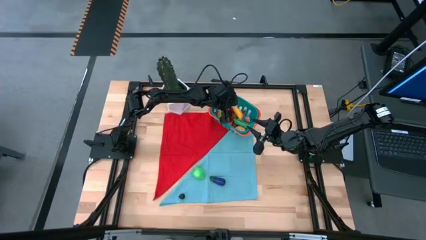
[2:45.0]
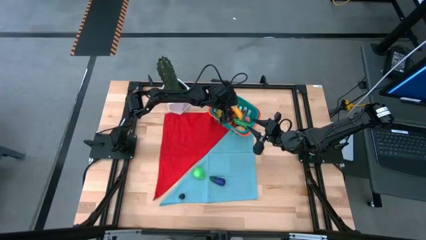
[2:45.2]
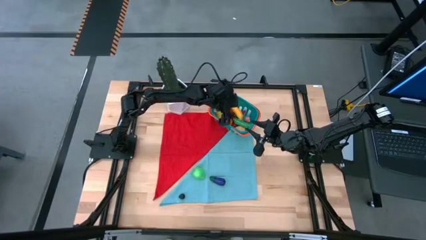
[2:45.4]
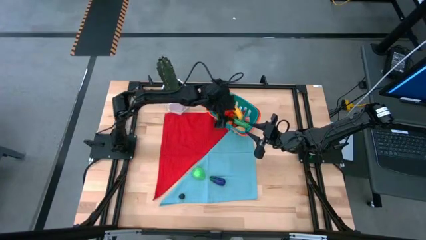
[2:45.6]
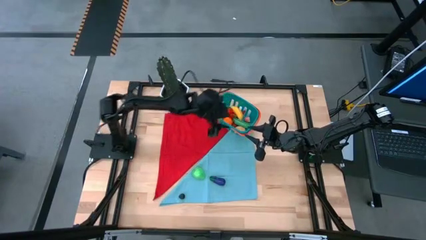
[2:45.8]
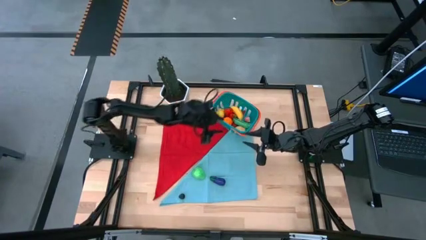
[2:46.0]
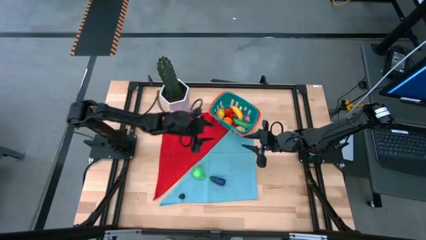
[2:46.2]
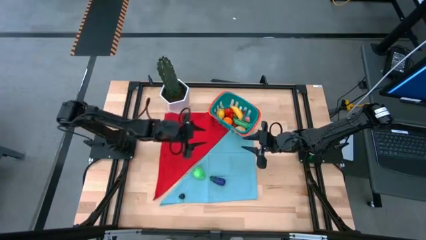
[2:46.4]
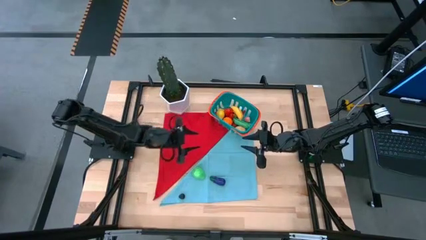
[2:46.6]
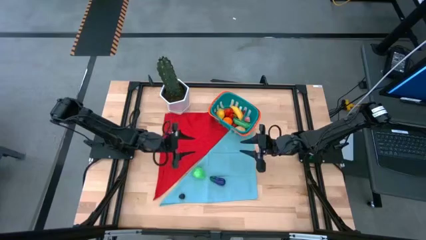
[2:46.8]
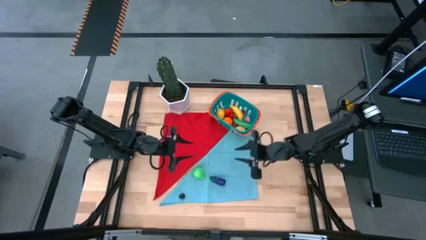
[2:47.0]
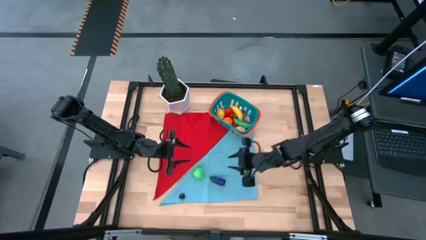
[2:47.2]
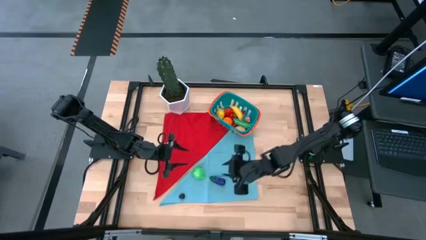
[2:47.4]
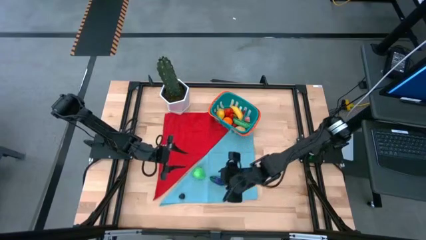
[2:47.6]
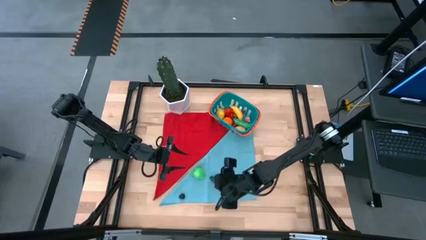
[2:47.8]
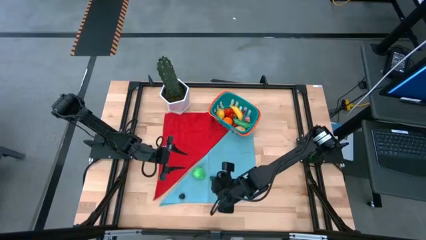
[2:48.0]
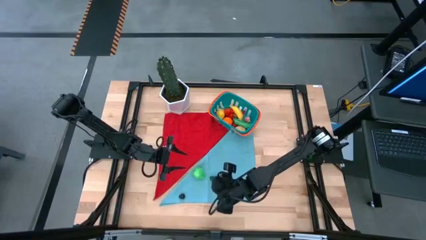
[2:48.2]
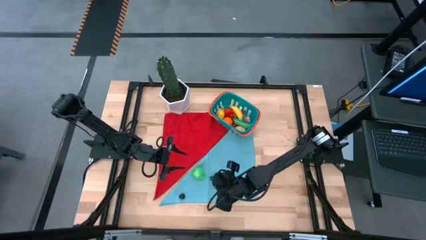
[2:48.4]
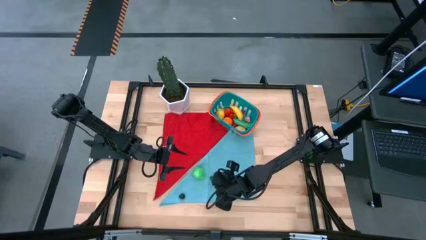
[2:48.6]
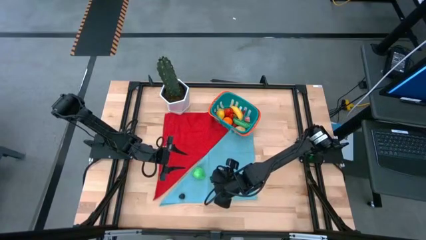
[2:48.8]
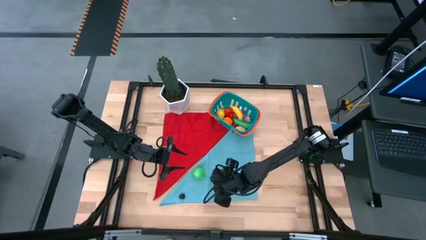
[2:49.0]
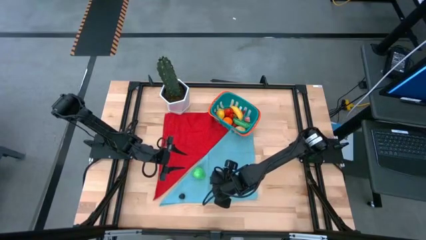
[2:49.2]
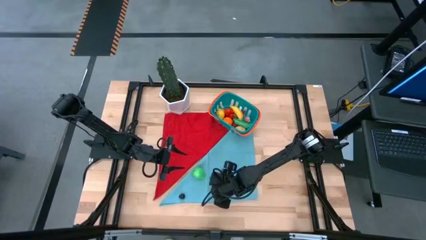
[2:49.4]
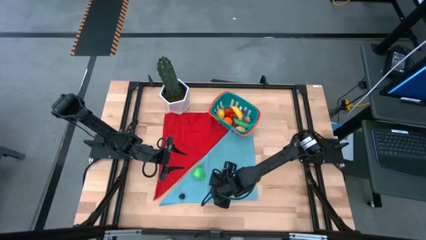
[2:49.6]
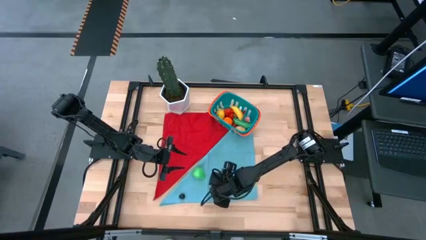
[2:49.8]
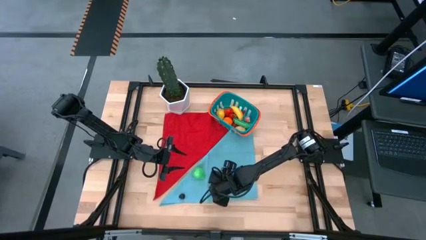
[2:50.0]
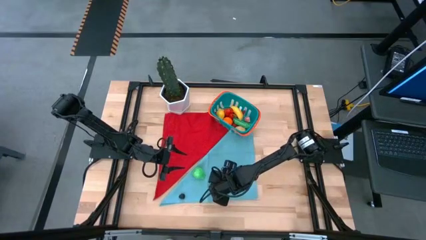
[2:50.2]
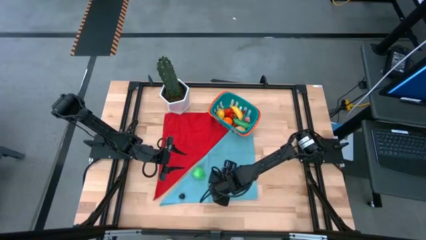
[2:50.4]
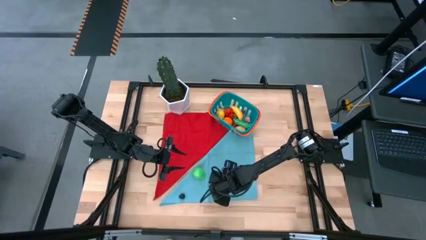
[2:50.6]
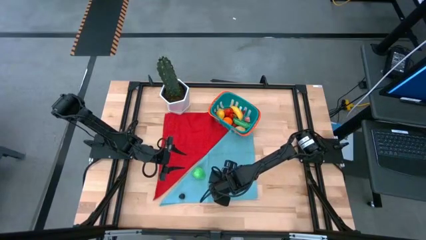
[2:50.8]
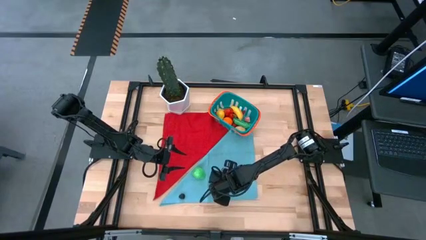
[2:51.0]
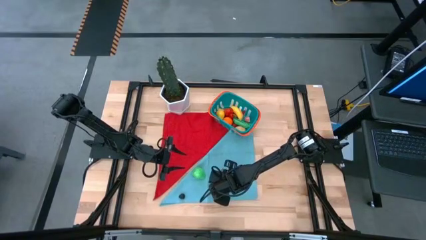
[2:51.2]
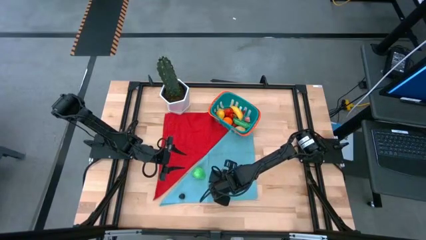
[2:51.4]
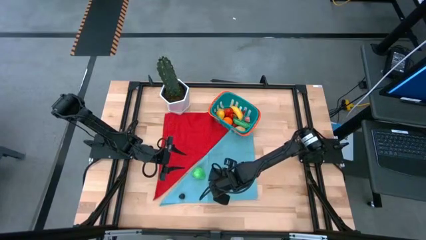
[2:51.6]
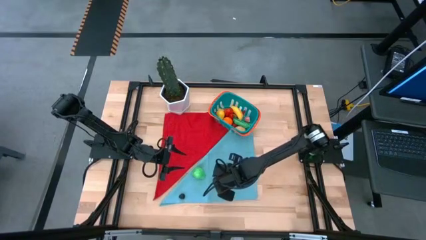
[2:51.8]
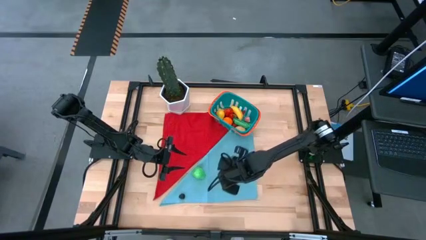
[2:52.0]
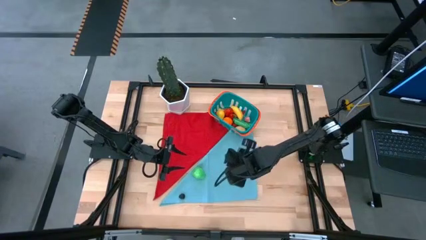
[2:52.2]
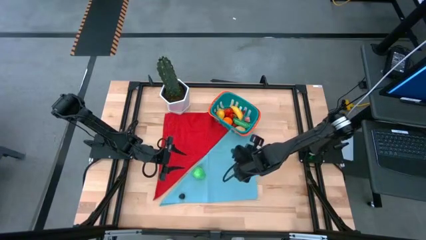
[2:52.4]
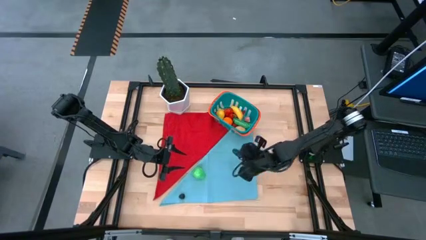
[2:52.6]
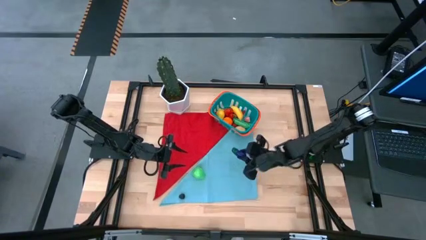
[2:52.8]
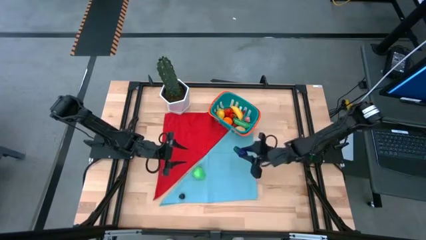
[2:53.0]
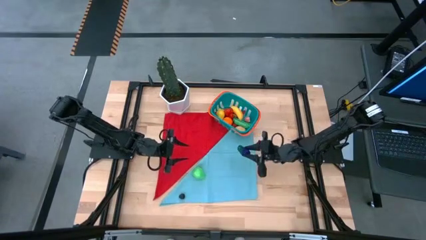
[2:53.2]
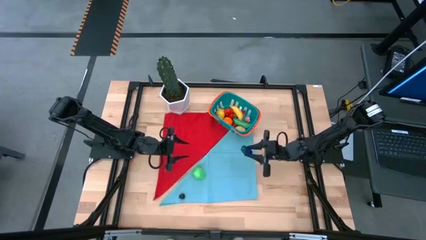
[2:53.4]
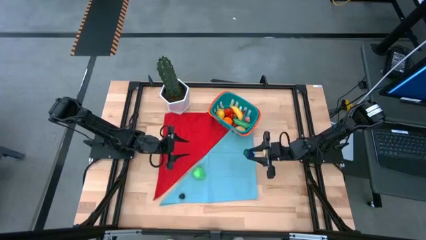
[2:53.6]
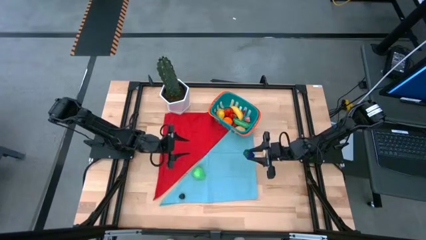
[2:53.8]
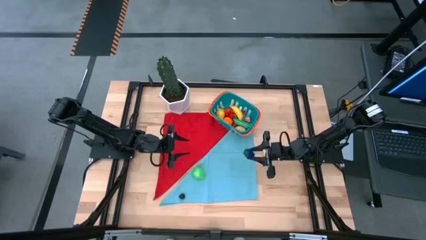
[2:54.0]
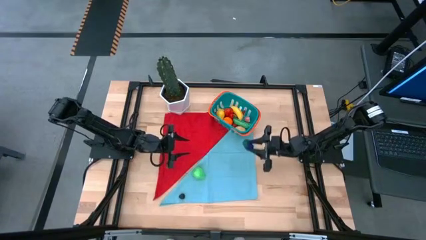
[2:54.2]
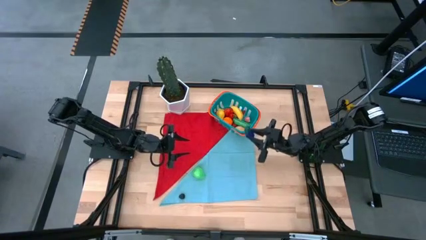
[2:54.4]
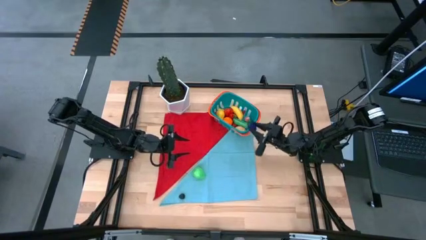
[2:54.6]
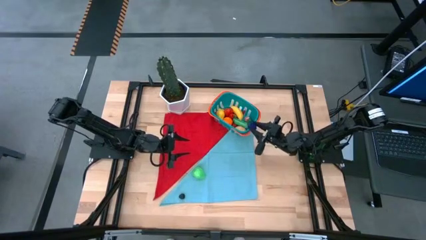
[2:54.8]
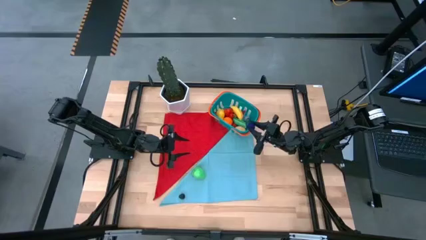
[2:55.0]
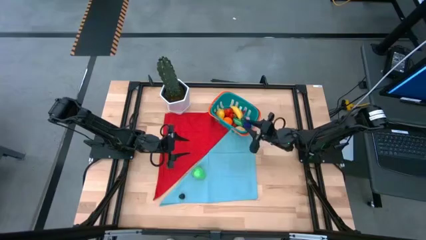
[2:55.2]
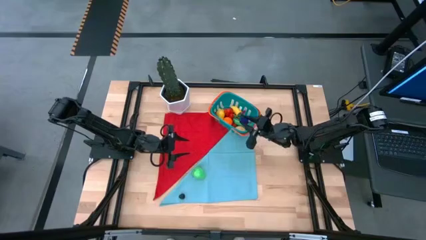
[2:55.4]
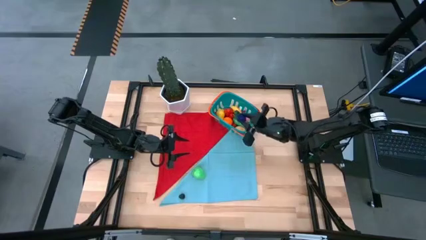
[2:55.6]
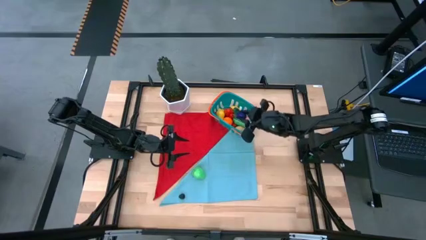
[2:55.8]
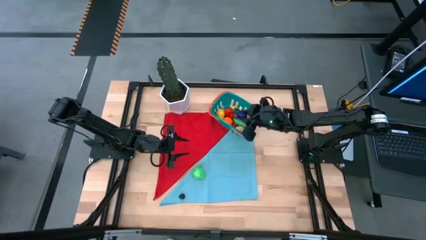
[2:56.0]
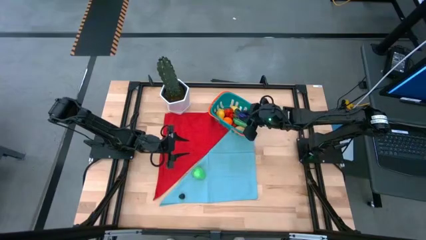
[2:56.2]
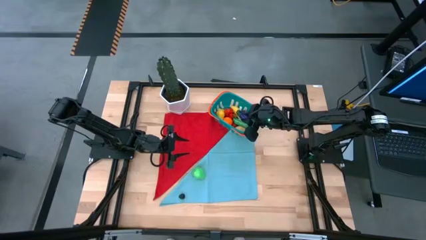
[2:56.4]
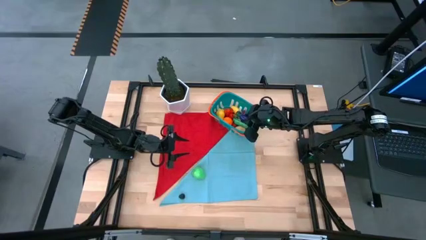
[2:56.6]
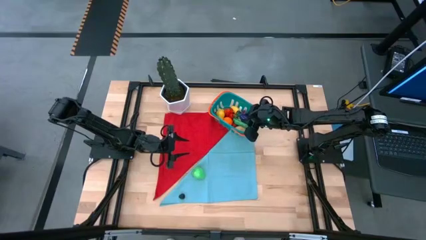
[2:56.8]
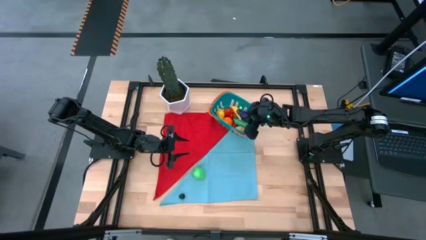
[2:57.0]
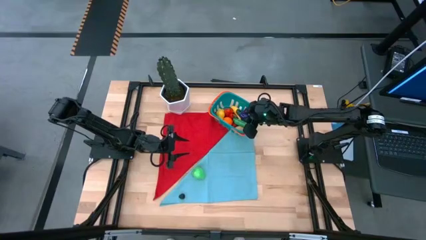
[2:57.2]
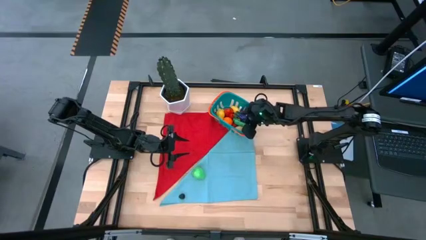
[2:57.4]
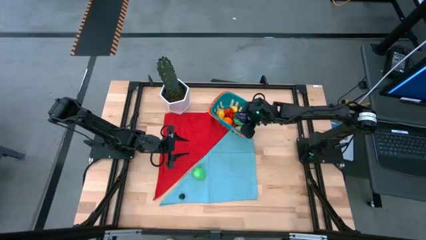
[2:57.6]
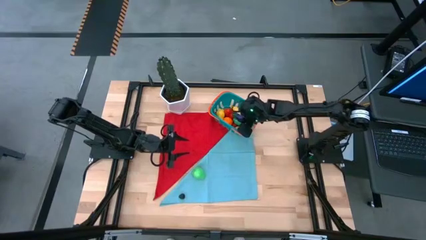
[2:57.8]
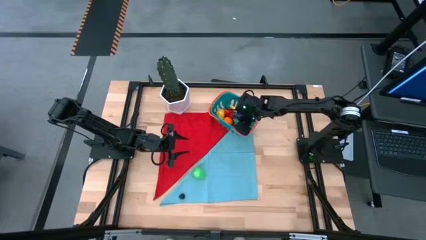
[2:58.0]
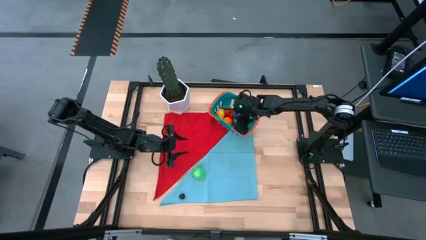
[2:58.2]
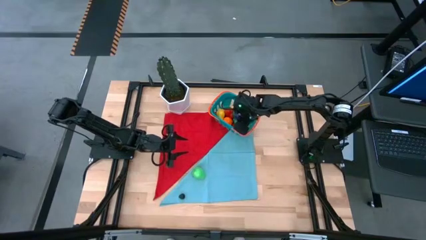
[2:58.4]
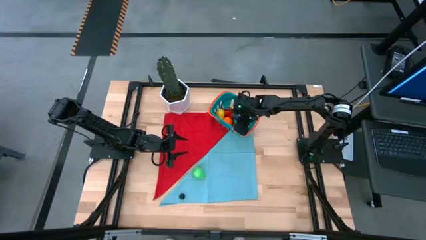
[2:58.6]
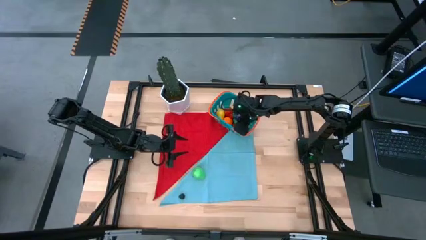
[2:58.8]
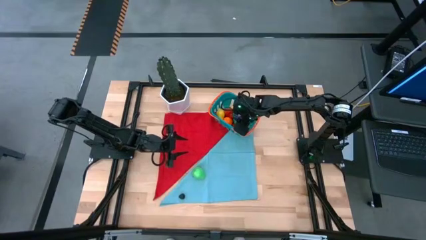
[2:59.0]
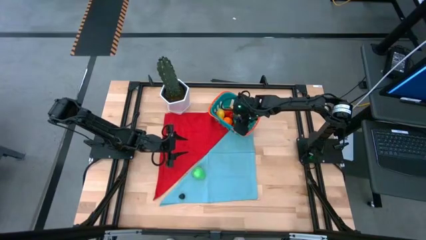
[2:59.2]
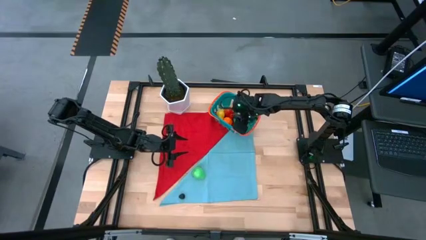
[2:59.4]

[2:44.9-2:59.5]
Task: Pick and placing Produce into tupperware
Put the violet eggplant into the blue basket
